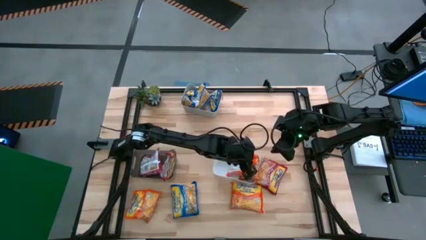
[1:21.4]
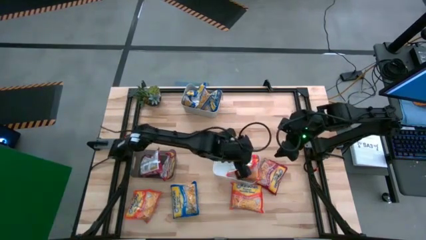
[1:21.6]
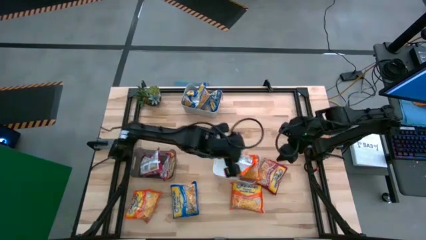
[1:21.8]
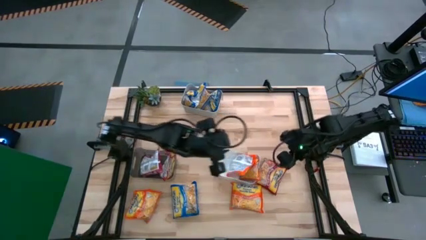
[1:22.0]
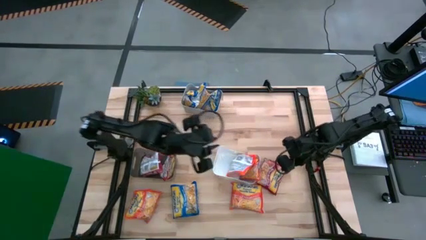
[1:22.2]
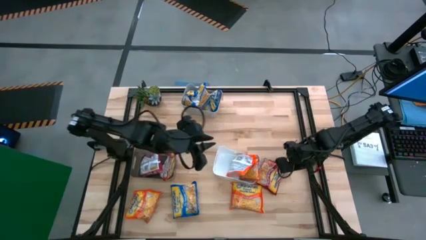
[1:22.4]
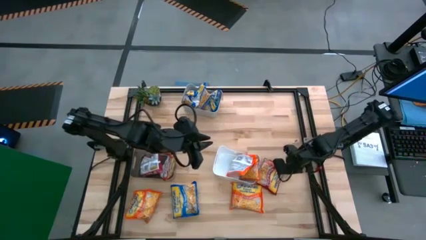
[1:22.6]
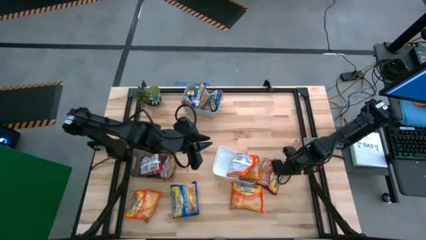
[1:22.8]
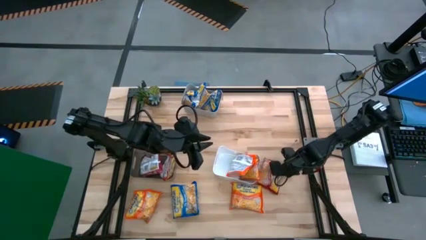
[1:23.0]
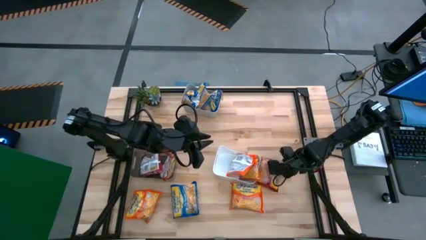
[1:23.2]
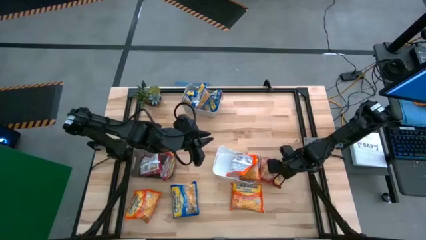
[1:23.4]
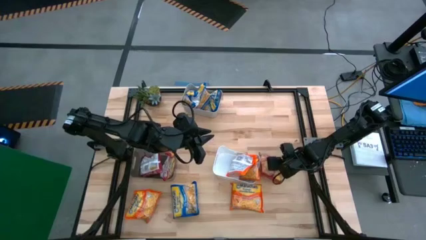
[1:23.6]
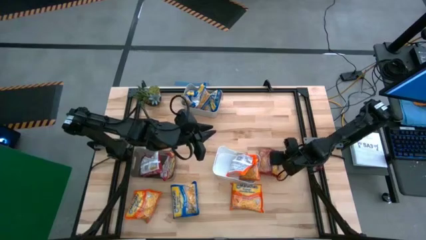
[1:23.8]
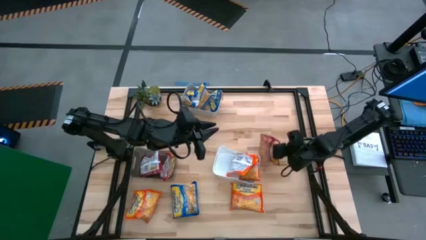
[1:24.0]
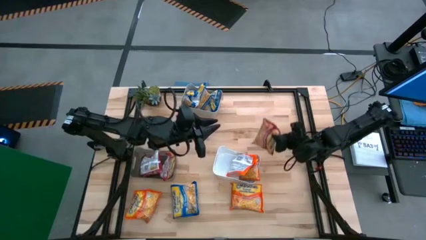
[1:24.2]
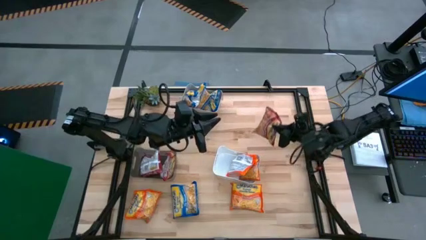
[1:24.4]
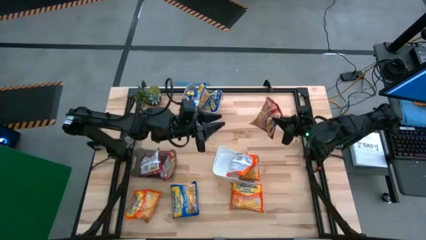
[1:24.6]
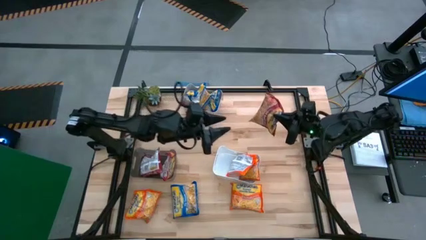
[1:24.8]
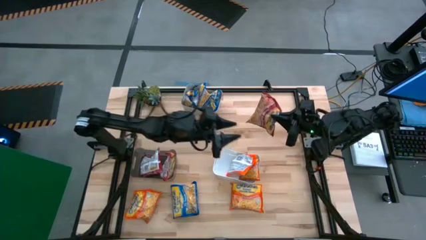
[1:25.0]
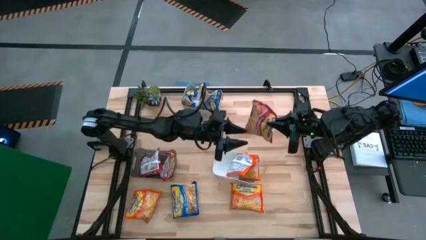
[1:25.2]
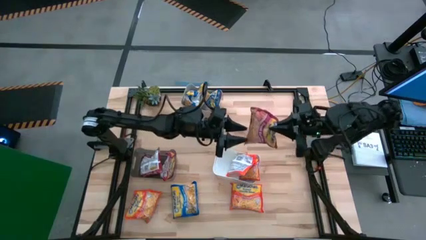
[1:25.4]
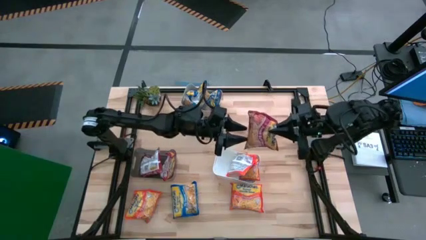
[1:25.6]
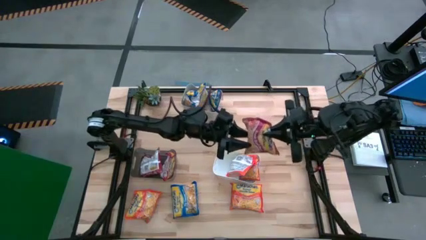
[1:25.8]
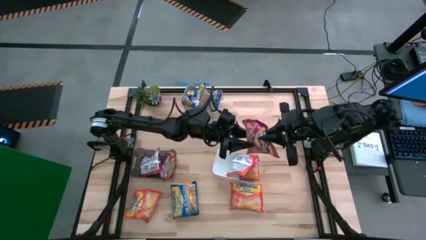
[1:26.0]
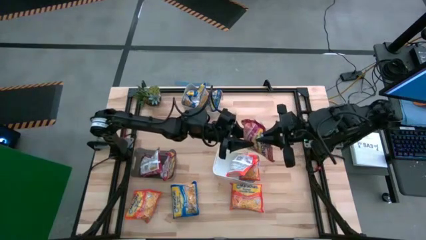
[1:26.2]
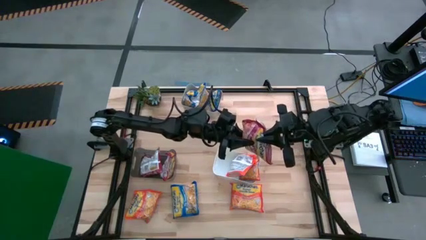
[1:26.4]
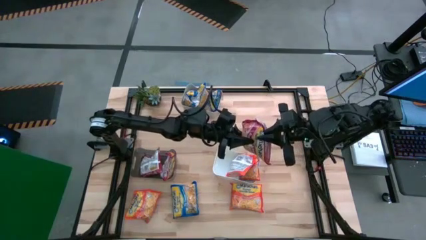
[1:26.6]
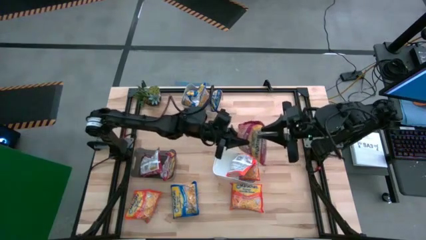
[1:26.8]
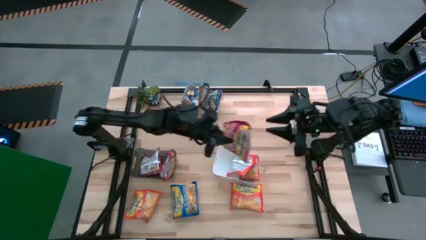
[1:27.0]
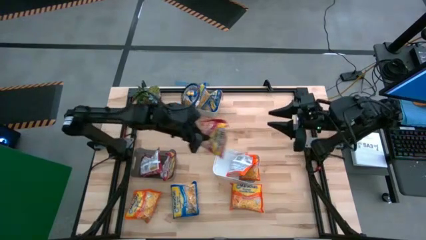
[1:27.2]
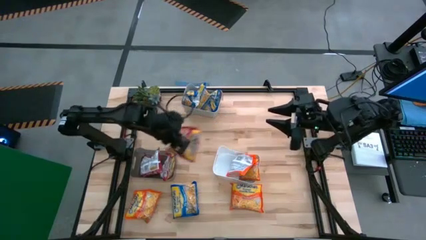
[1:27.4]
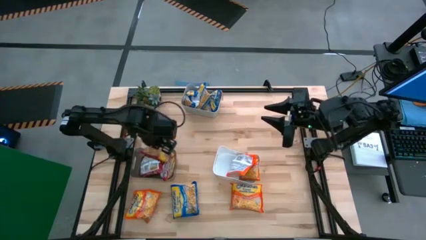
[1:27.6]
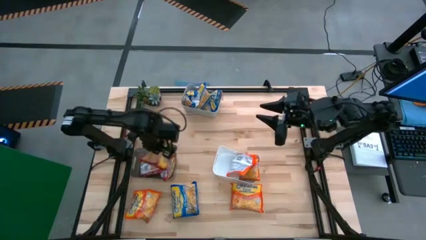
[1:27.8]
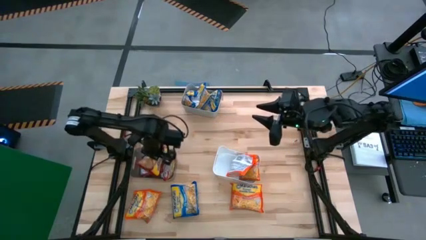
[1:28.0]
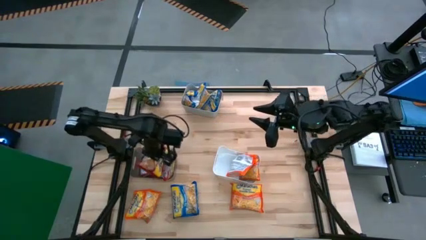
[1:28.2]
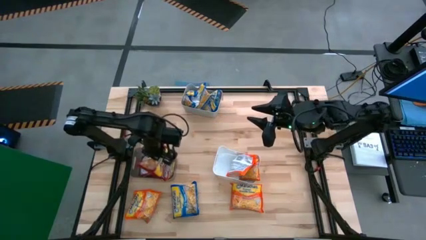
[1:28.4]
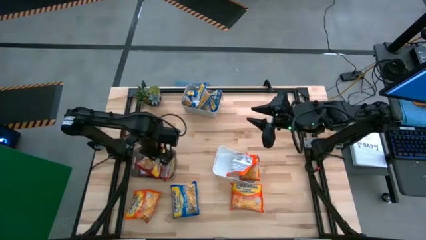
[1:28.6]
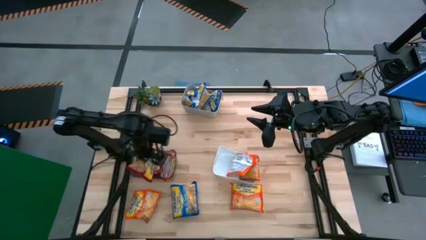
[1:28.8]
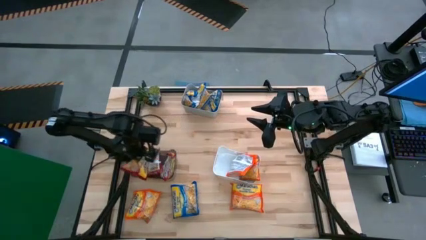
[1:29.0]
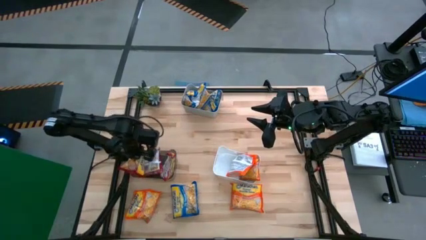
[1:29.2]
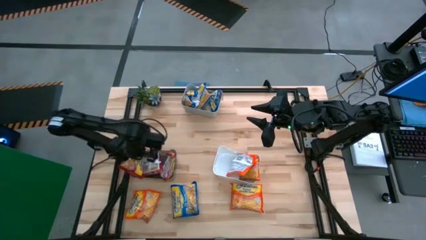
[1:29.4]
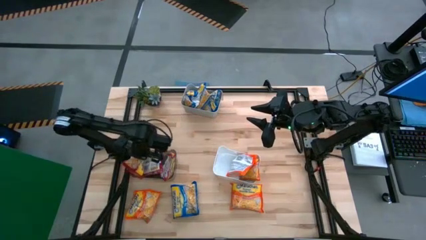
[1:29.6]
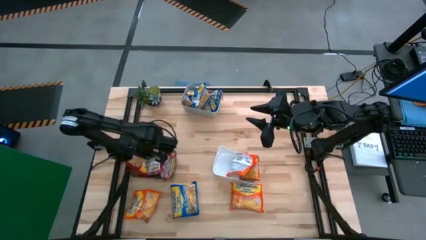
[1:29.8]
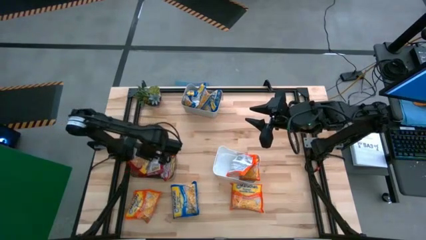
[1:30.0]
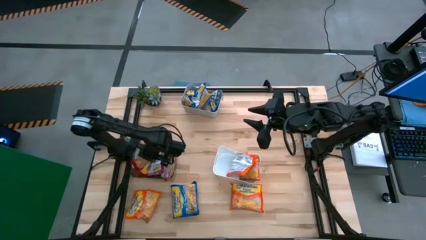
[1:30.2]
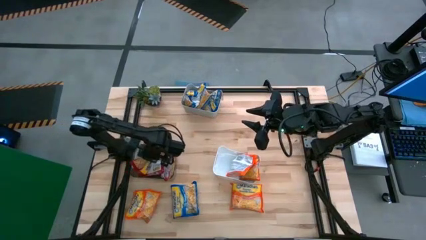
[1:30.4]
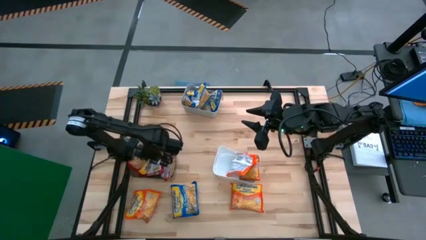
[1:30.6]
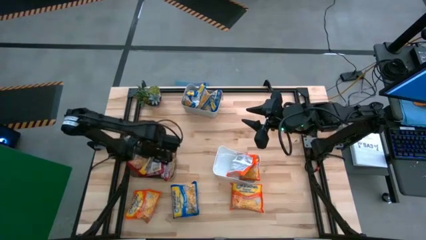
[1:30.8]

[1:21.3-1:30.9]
Task: Sort Maruchan noodles
Put the red noodle pack into the black bin

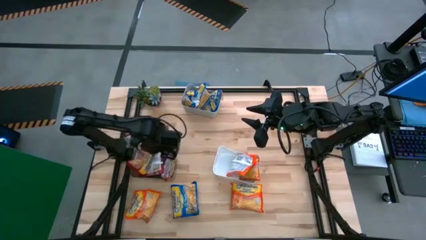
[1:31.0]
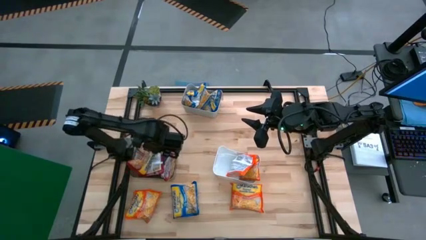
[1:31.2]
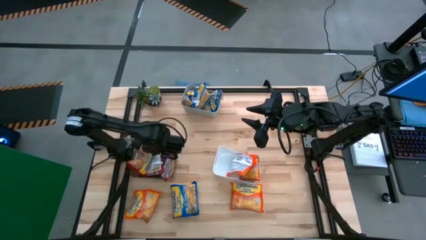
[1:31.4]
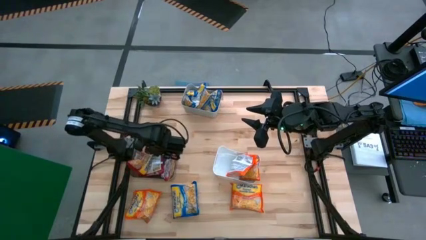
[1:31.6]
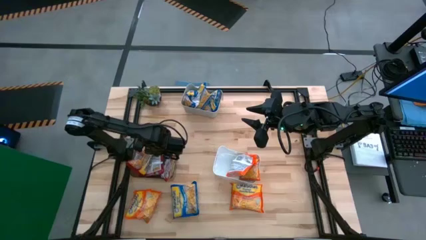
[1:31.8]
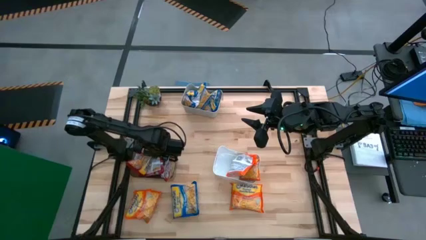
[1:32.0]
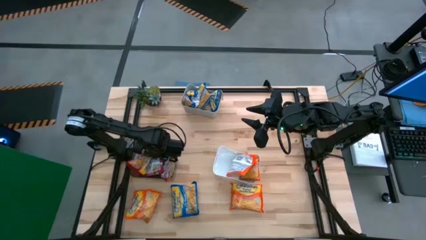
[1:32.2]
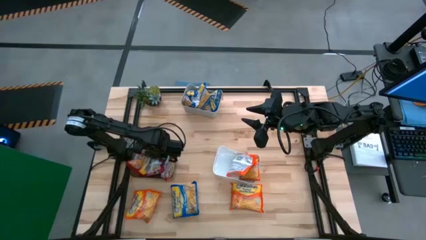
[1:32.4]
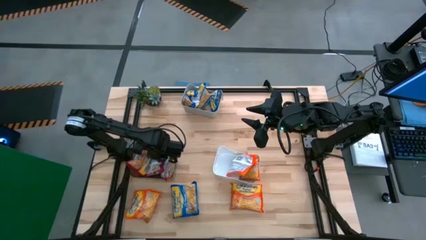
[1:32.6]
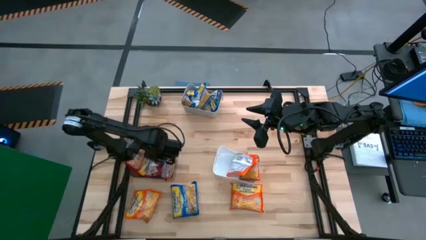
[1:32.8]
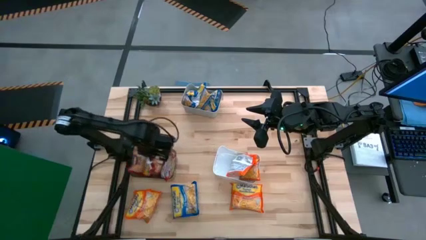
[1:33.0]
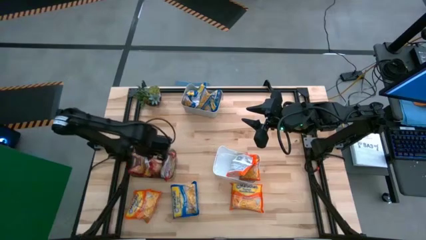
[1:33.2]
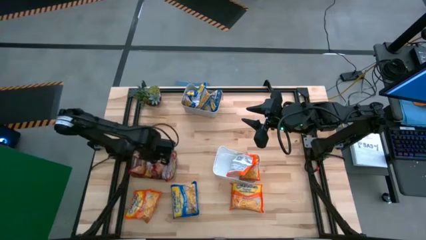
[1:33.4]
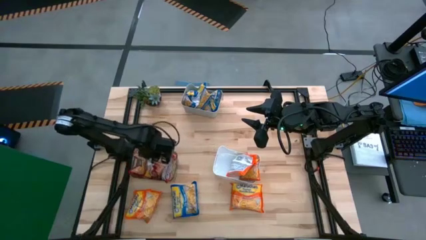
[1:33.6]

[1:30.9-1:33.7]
Adjust the red noodle pack in the black bin
